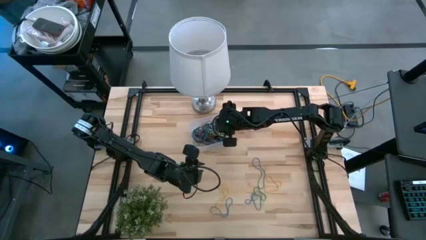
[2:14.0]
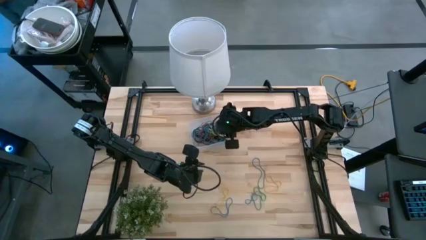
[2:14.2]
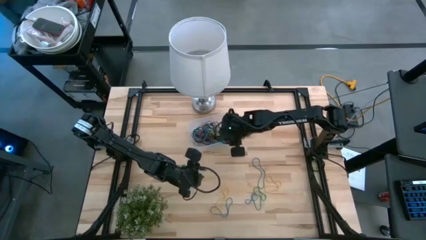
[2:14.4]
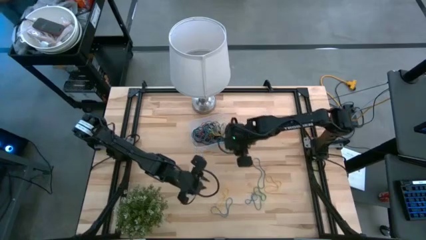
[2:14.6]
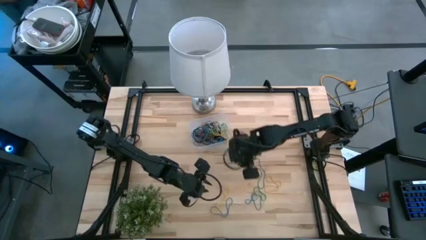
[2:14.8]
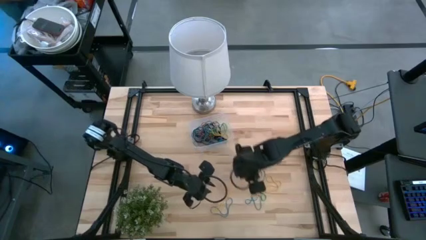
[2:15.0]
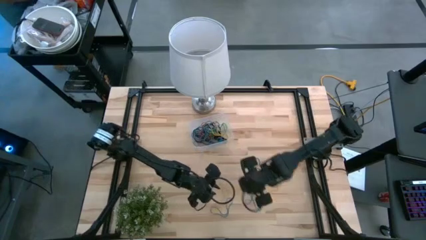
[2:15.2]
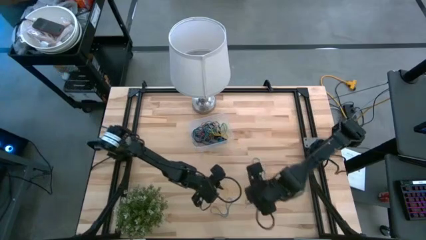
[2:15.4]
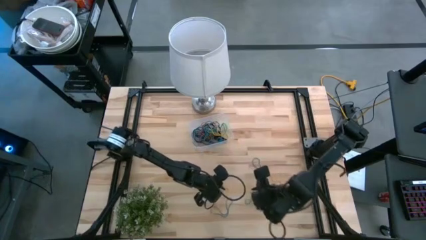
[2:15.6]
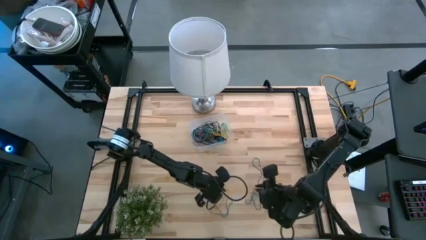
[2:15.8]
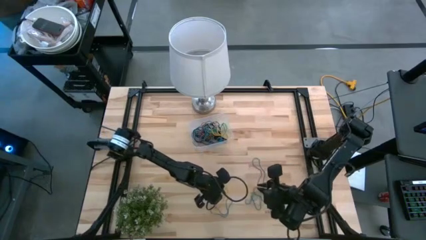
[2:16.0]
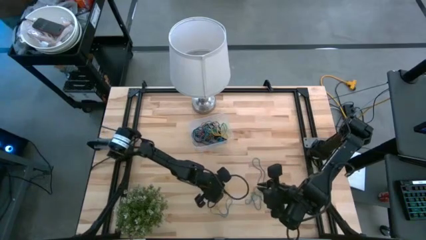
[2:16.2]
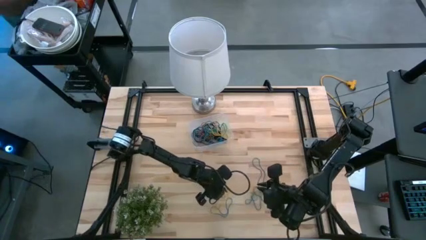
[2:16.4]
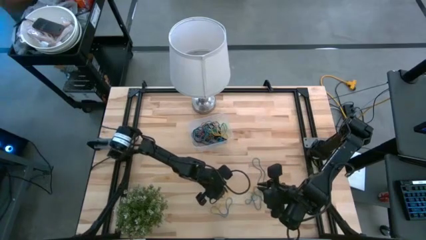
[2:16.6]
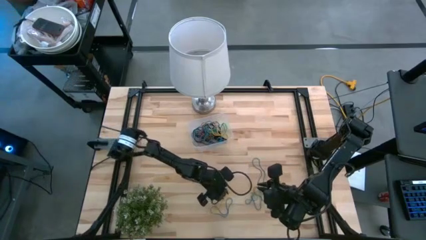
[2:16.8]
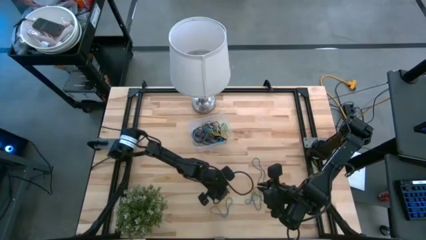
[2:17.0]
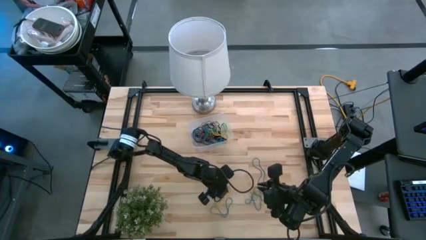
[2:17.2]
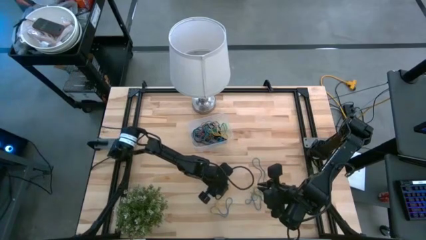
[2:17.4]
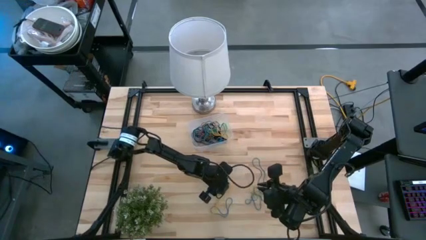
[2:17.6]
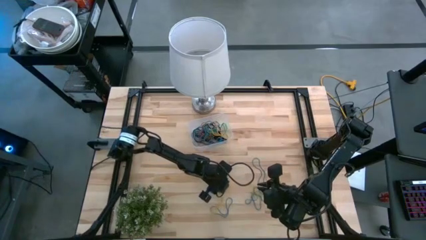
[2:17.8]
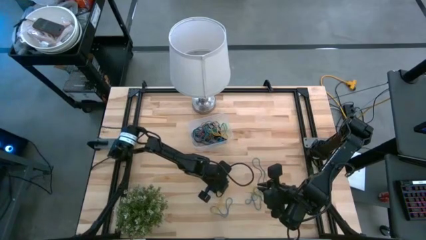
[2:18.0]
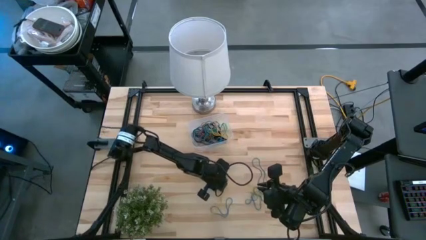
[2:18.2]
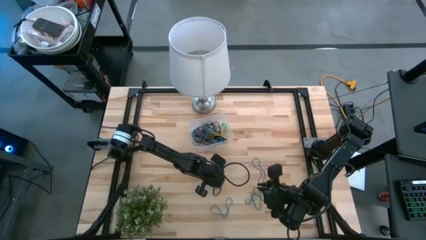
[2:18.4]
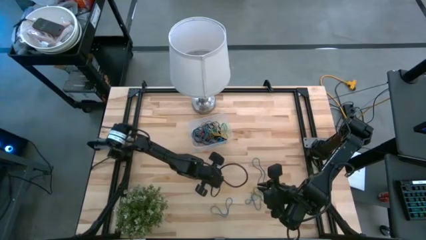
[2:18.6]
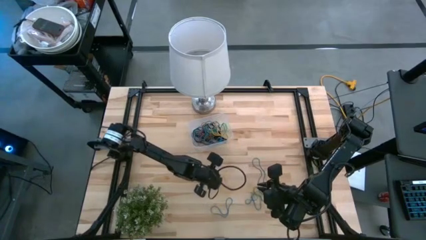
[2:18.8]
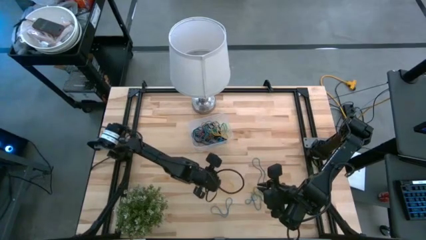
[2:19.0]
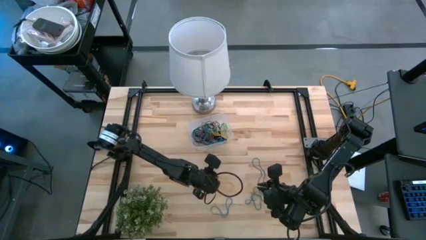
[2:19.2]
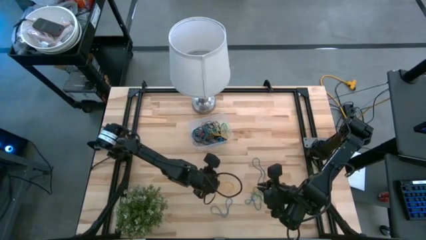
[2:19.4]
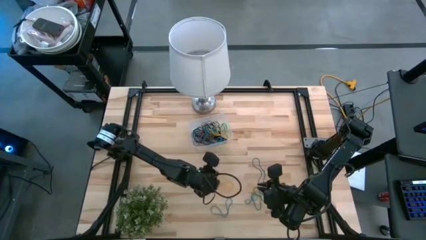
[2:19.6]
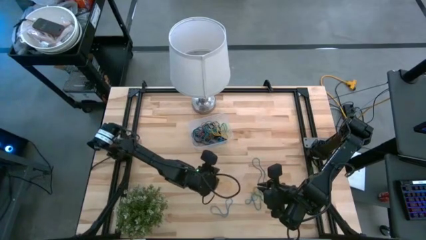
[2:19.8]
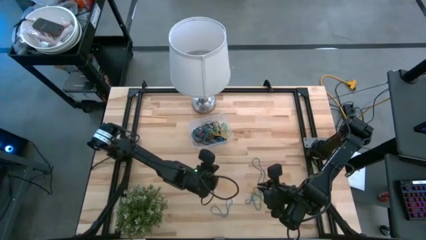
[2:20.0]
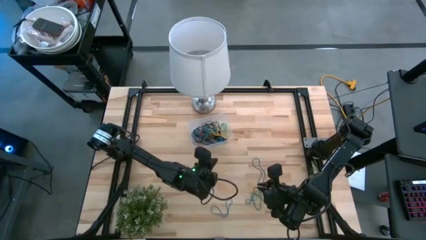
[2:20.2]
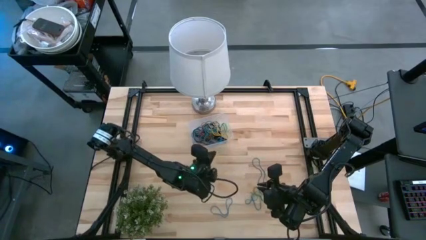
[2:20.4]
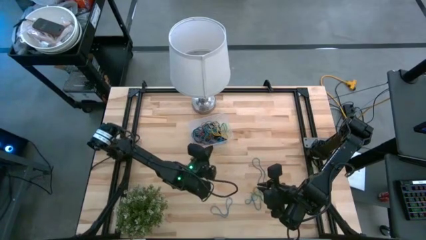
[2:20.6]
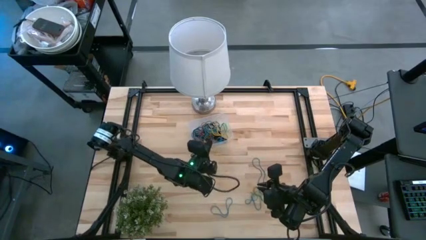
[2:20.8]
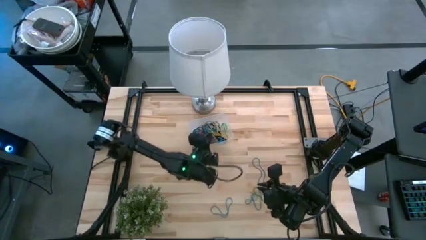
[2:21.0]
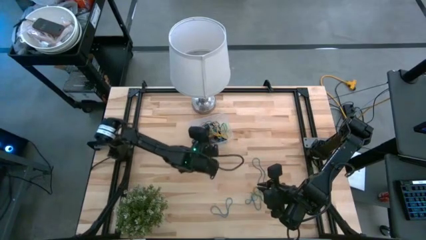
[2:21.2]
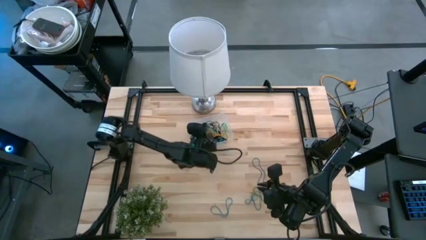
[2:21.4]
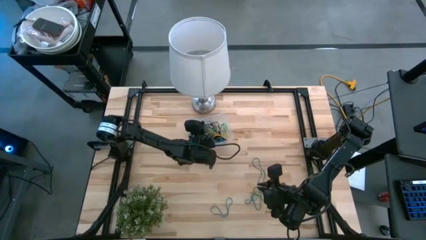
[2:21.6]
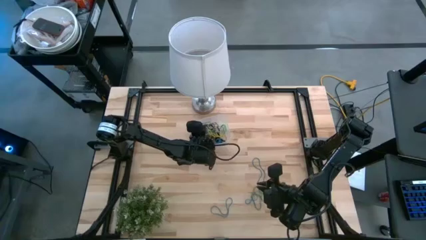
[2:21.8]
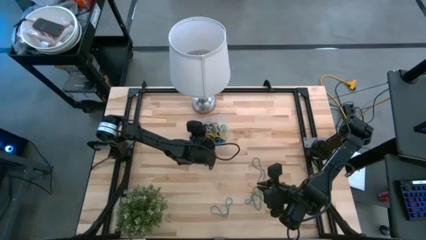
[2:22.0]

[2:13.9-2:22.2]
Task: Pick and place rubber bands into bin
Put the yellow rubber band into the transparent container

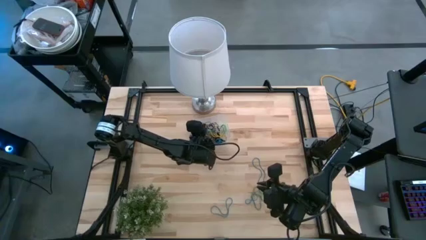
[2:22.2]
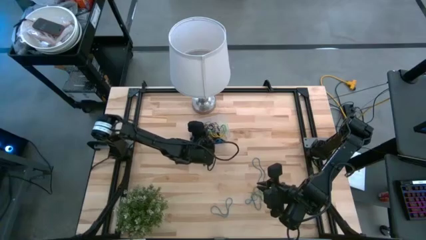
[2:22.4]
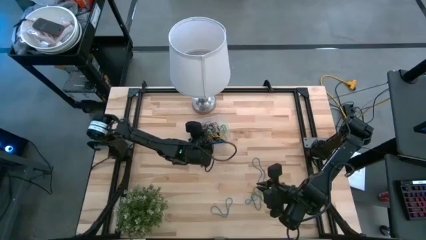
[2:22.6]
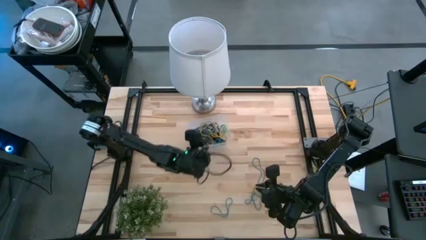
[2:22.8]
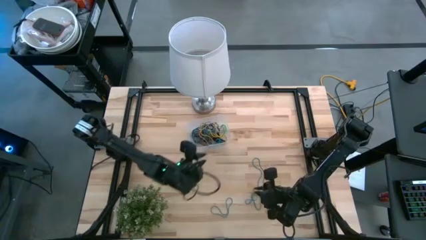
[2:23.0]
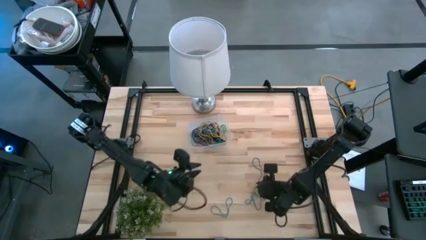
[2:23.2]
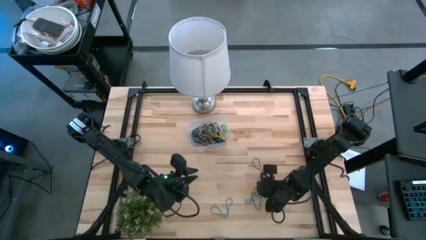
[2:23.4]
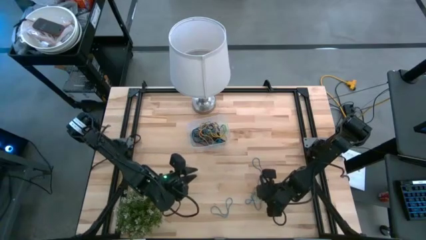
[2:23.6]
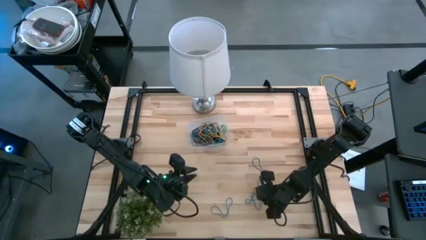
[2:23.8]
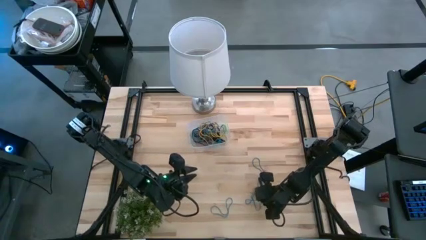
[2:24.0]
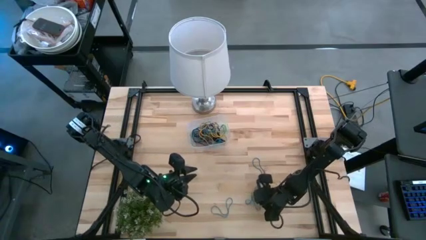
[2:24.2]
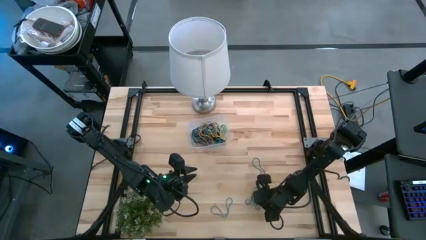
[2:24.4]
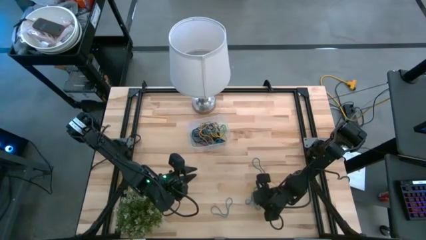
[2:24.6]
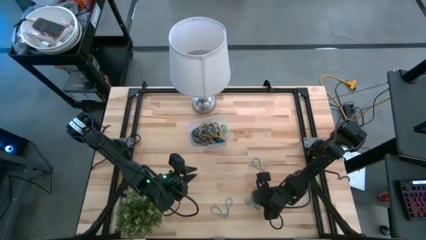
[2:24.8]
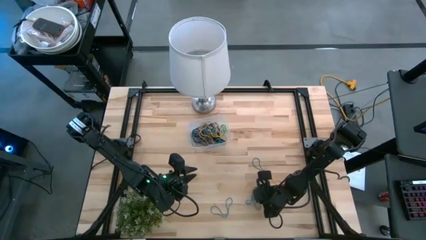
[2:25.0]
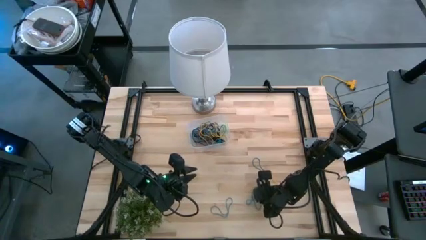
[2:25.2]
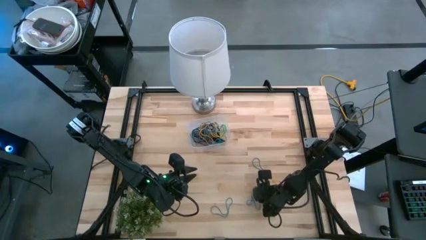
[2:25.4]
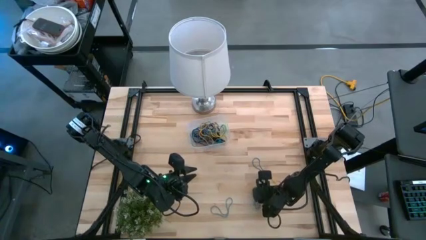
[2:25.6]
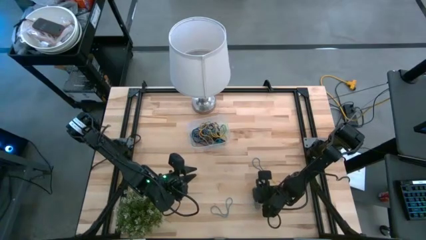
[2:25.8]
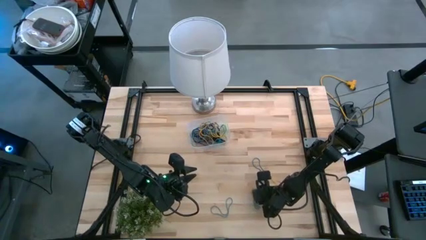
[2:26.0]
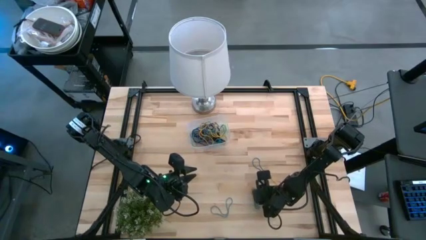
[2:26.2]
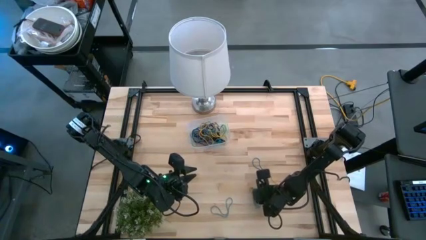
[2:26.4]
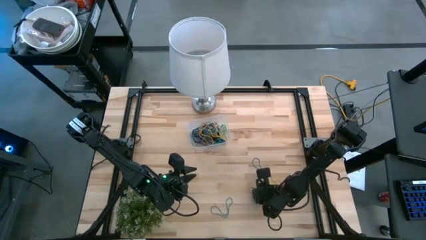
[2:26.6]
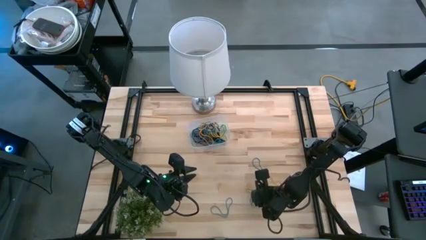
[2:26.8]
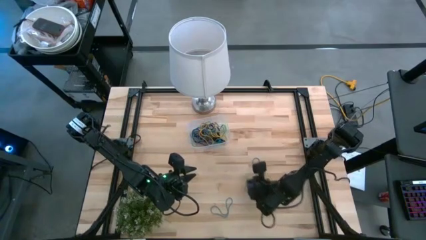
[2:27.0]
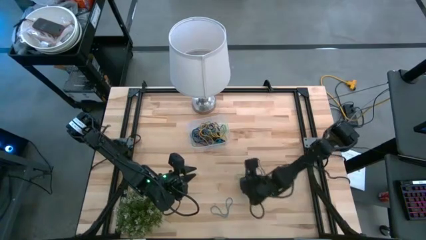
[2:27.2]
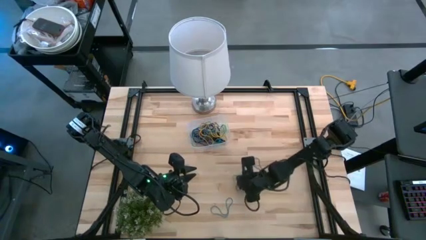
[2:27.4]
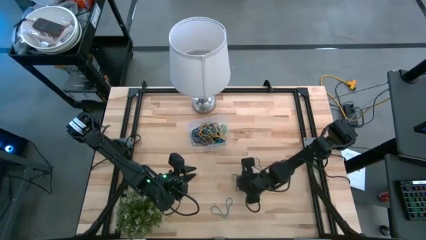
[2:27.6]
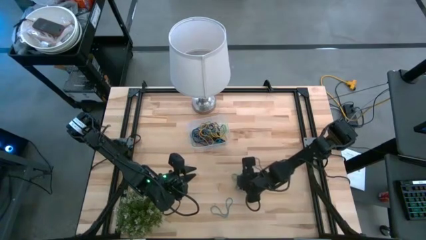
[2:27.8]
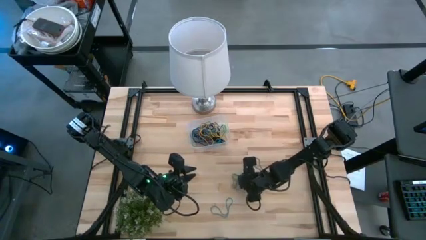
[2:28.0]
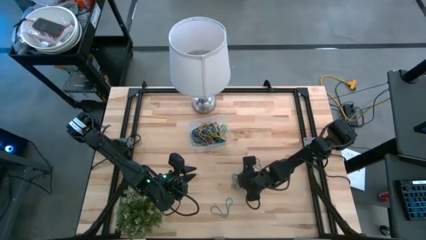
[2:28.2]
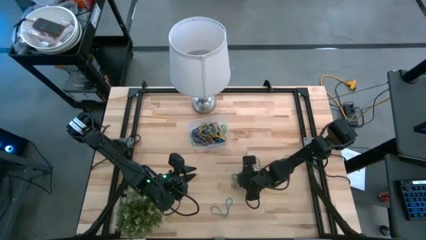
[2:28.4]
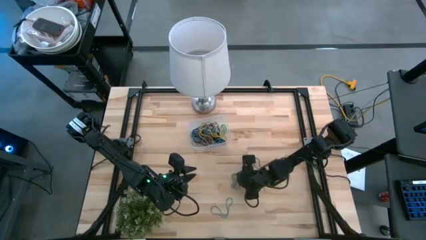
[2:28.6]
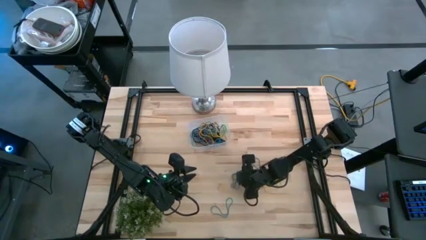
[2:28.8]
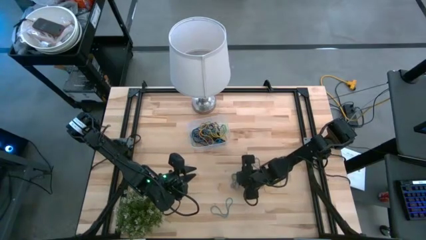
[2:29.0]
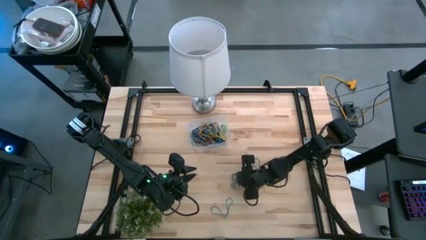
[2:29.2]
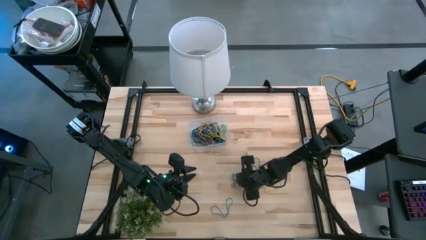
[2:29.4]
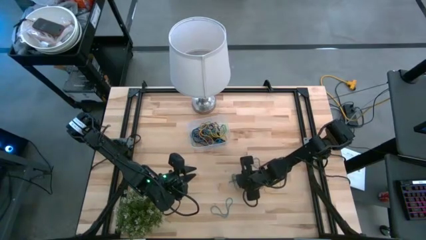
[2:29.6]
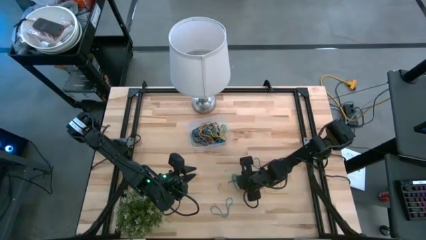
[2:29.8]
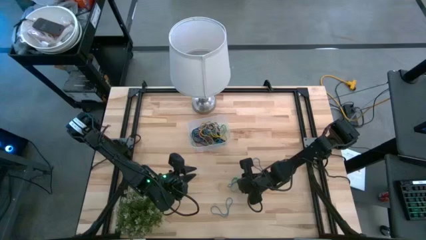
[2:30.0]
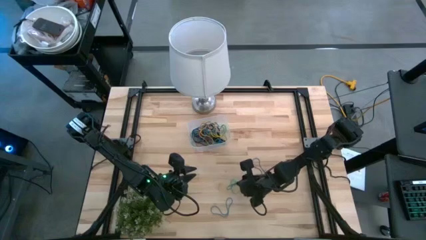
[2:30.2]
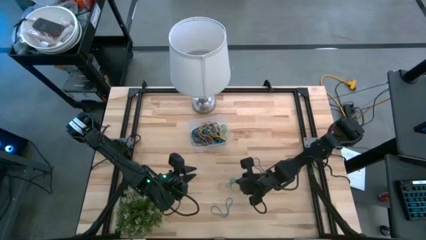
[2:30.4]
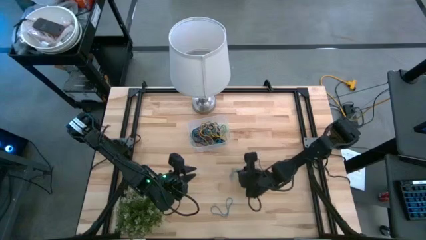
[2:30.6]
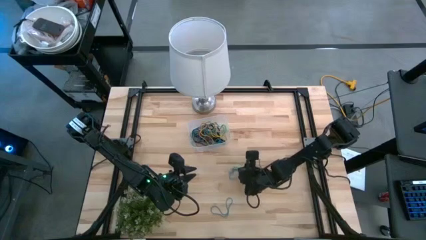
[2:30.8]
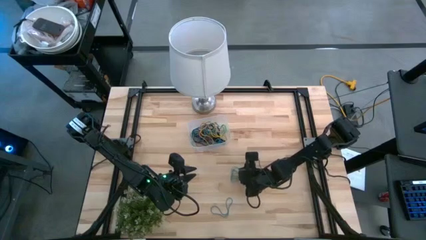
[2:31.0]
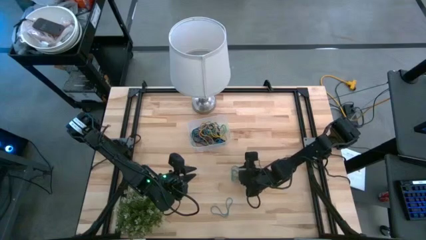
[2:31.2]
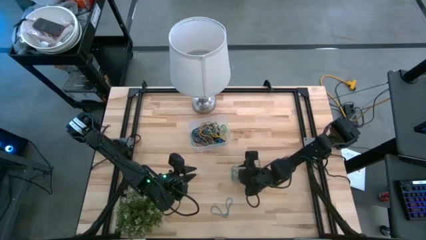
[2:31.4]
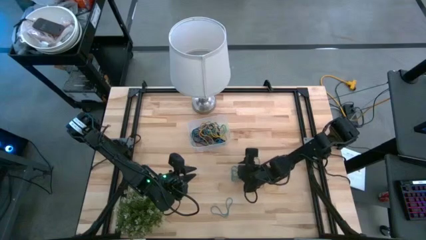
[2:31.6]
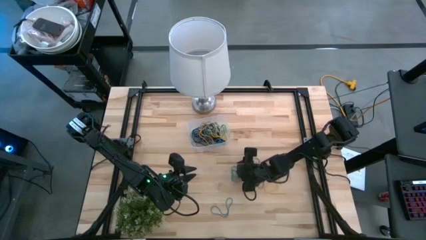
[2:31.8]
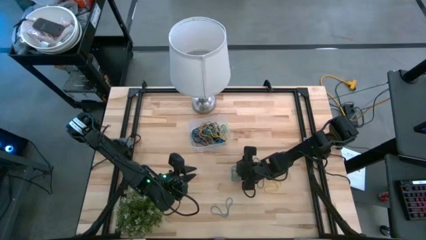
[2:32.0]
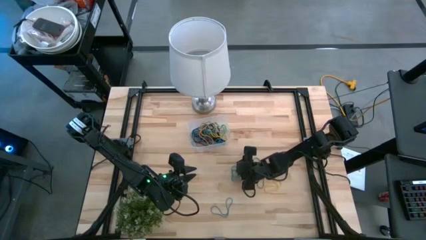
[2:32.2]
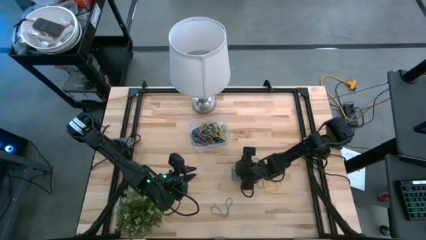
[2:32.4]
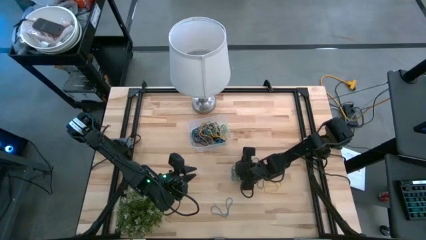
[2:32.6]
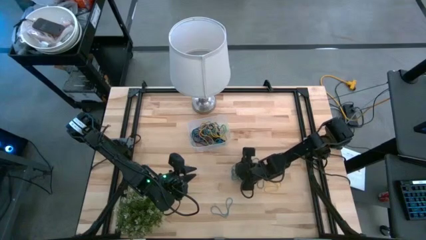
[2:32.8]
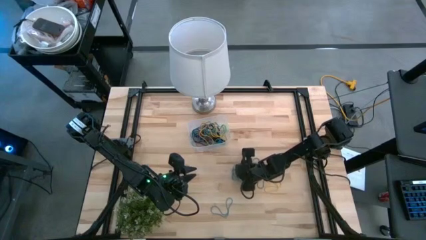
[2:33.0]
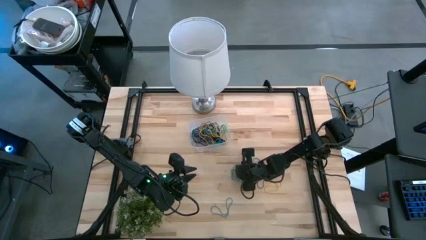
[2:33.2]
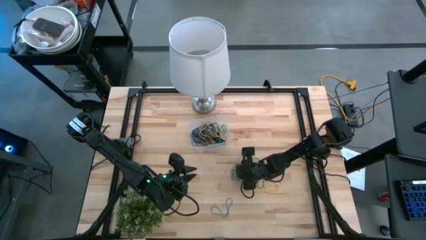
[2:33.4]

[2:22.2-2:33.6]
Put the blue rubber band into the transparent container
